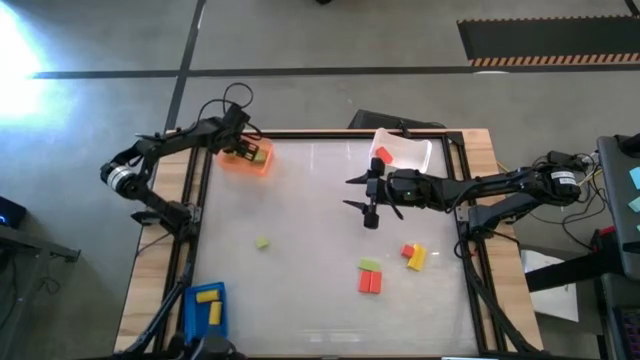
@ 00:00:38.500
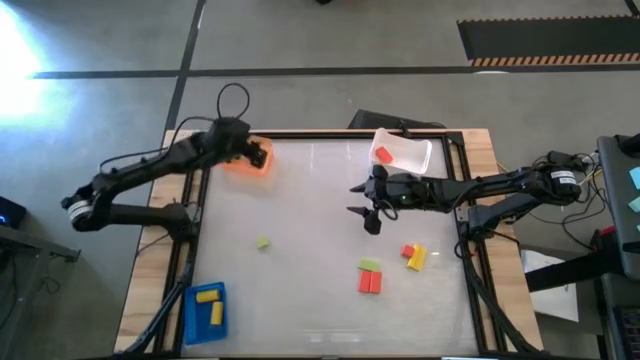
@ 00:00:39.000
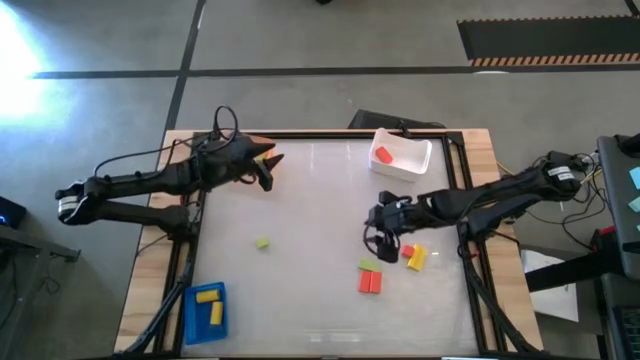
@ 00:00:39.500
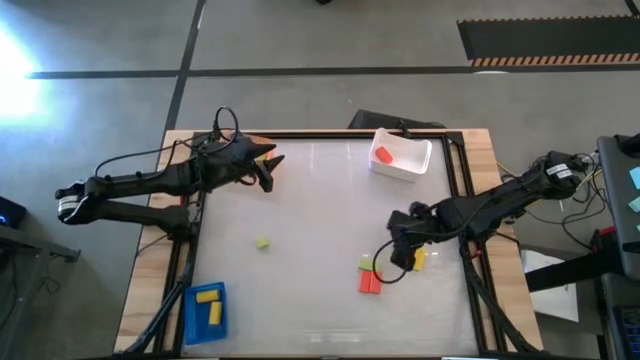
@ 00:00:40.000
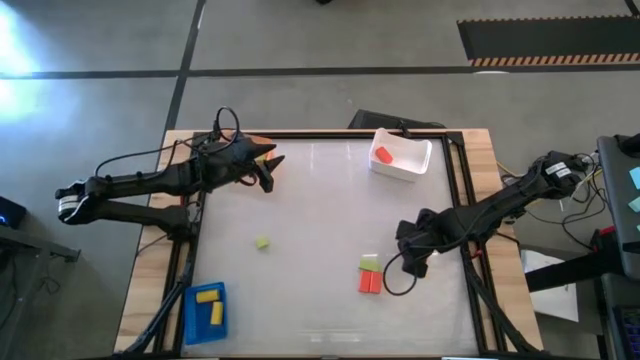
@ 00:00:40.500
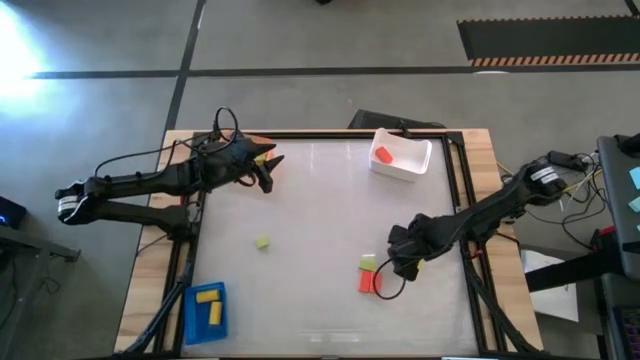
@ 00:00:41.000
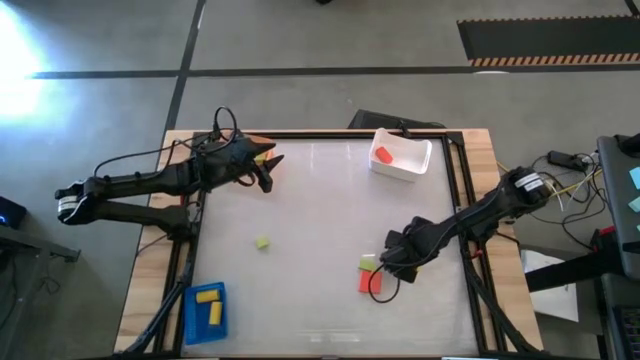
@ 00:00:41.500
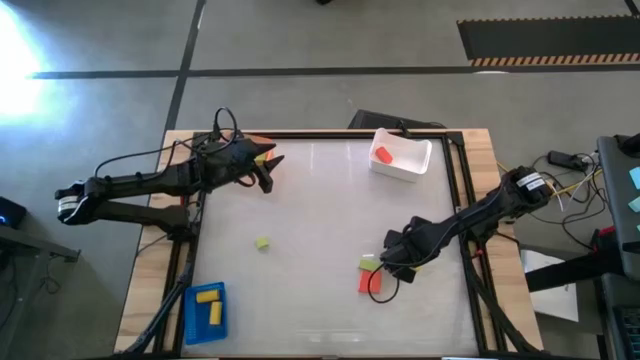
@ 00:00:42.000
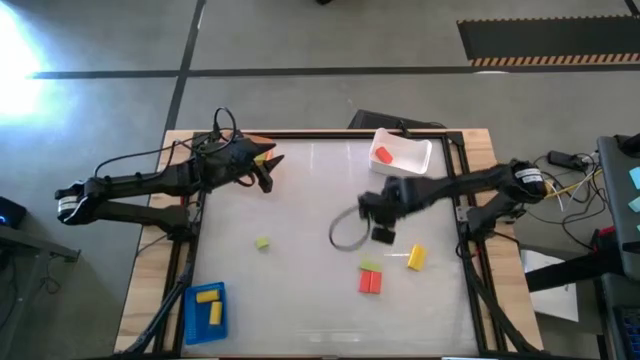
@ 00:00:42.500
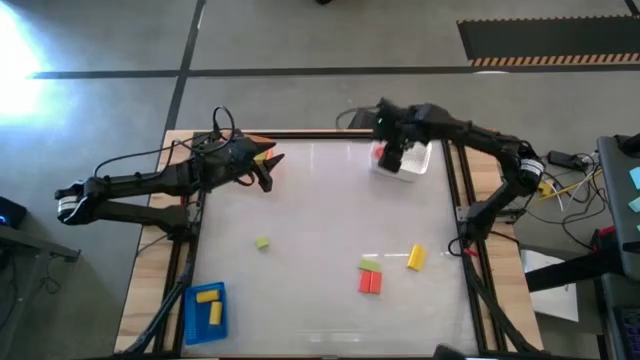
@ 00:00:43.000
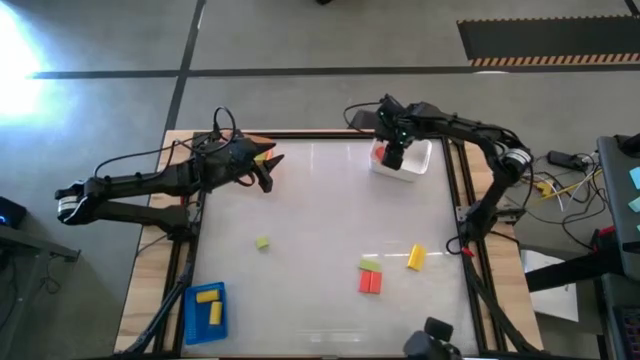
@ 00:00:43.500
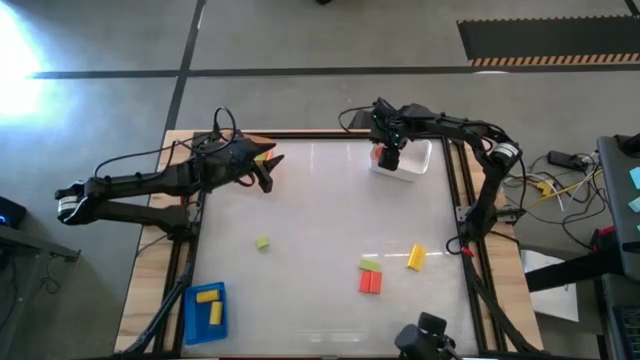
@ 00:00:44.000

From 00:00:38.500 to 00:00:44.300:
Task: Sort & place blocks by color
Put the orange square block into the white bin

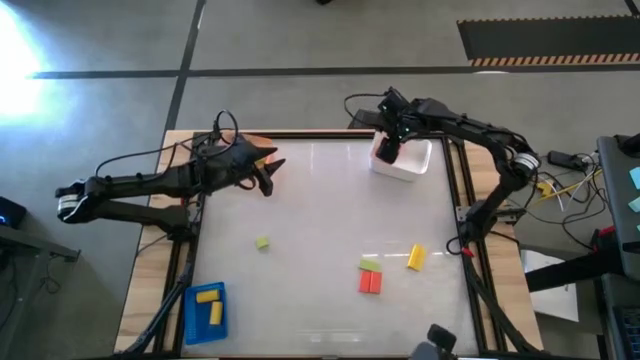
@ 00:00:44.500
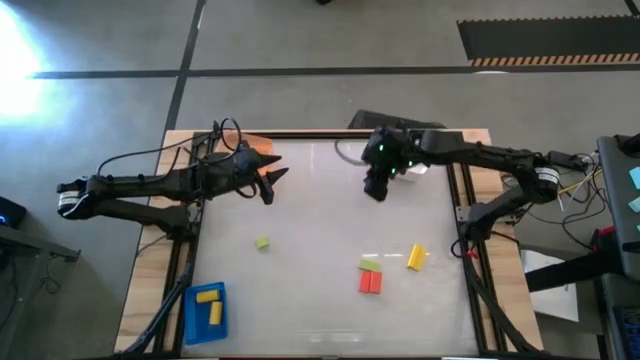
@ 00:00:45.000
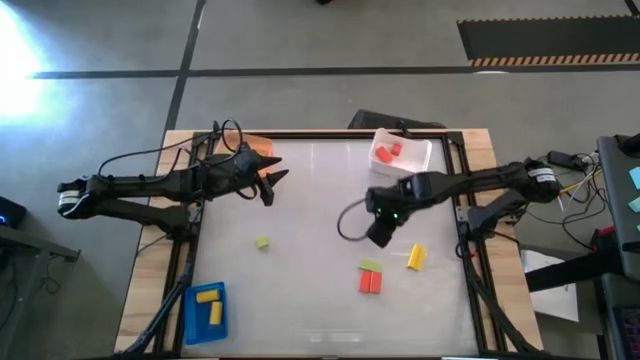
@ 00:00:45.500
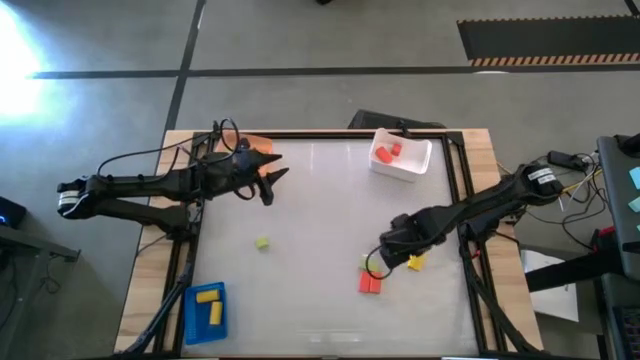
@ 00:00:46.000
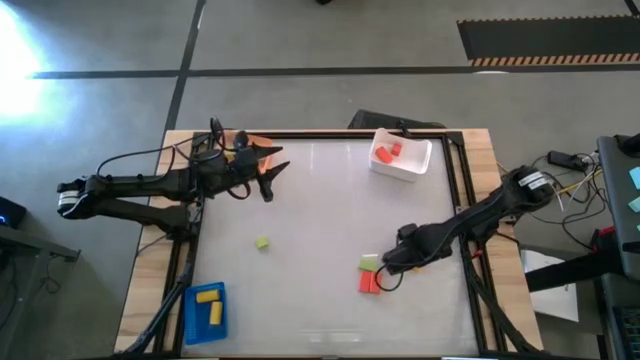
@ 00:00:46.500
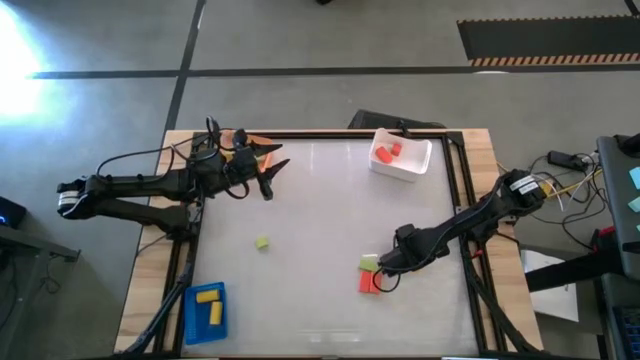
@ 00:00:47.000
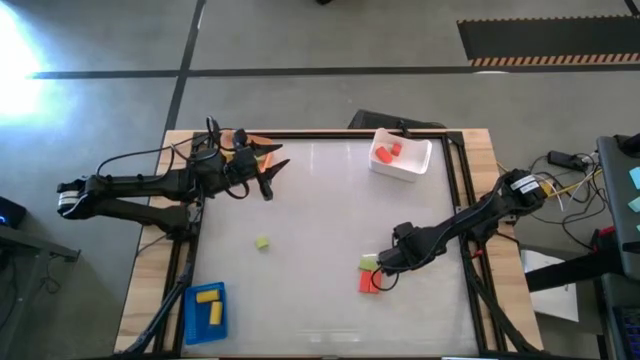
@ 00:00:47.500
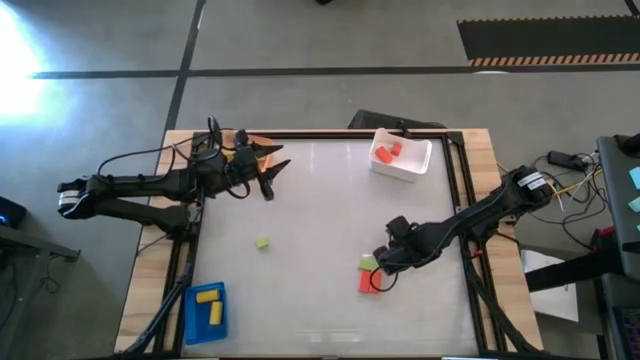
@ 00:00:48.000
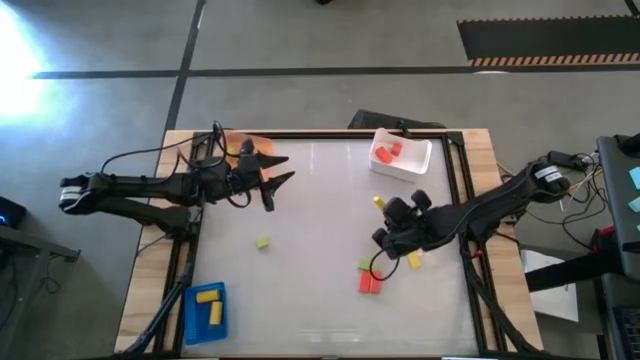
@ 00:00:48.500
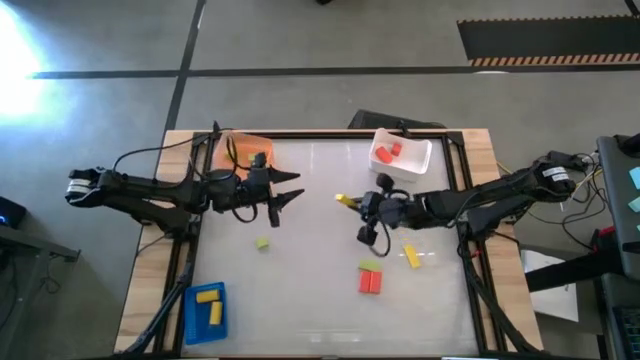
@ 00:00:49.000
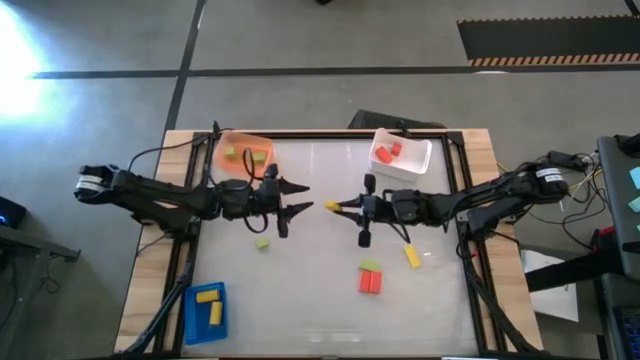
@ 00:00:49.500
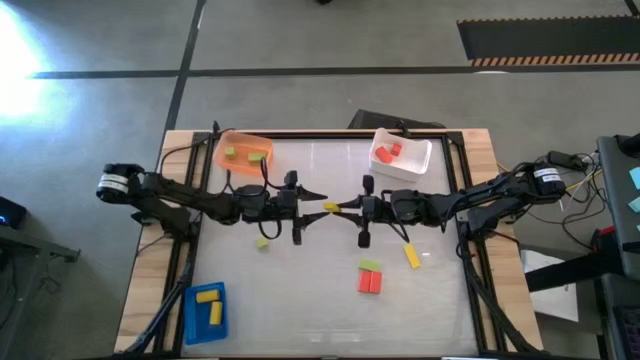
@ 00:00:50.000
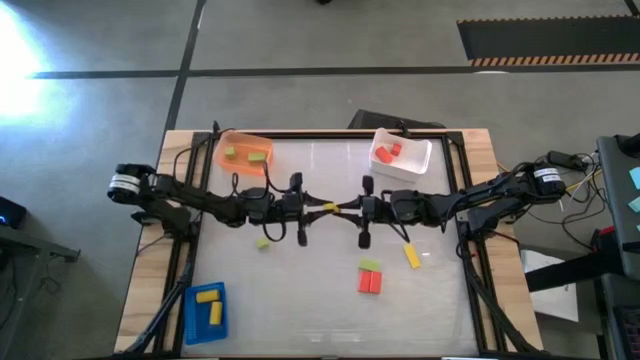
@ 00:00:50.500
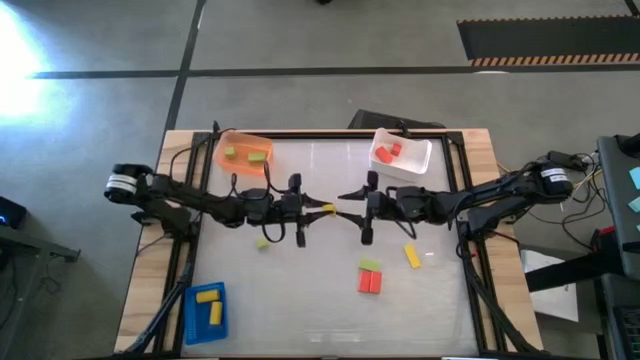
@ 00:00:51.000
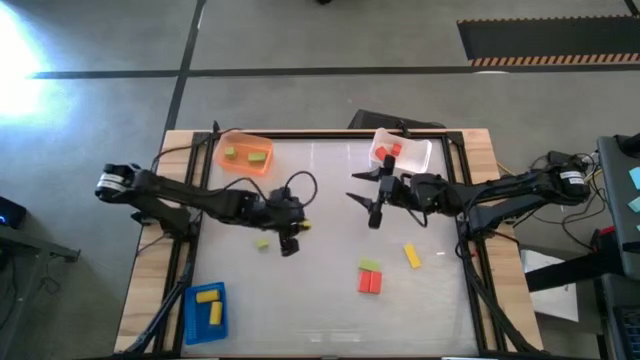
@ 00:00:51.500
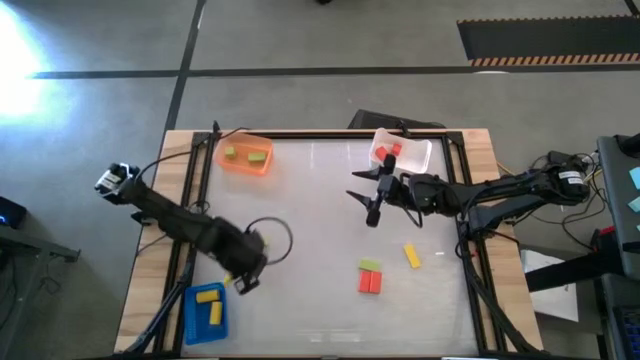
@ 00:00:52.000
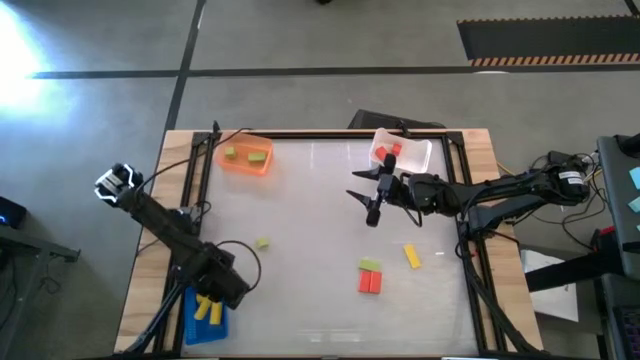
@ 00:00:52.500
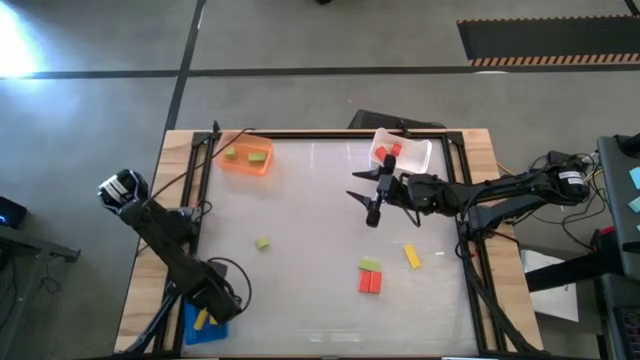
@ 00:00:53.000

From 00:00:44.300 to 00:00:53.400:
Put the left yellow rectangular block into the blue basket

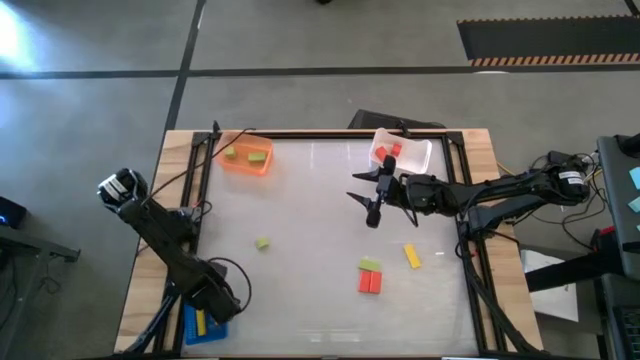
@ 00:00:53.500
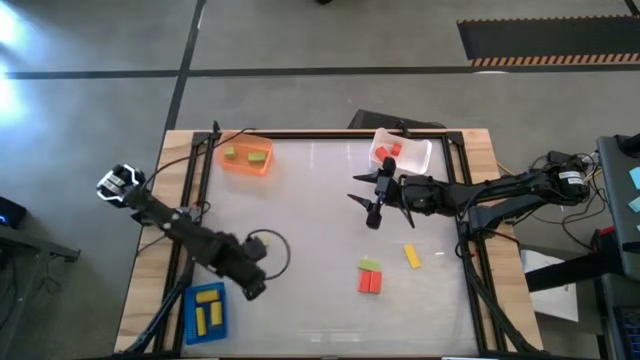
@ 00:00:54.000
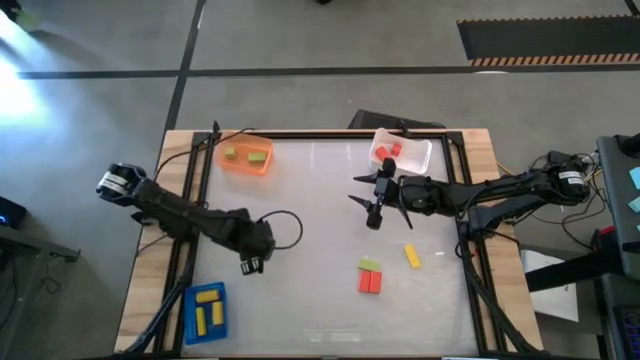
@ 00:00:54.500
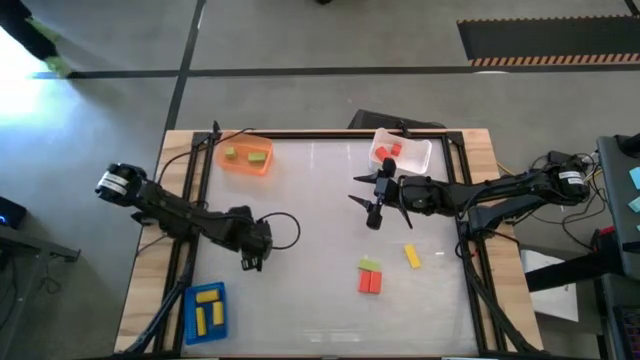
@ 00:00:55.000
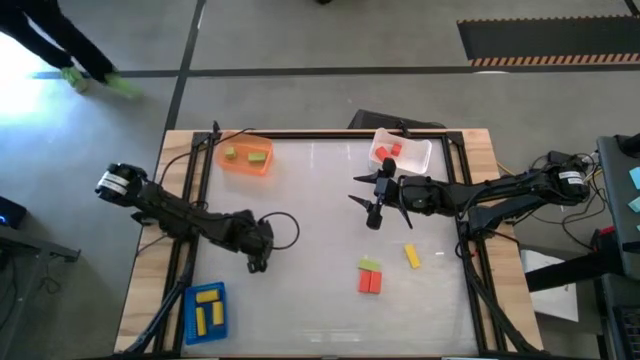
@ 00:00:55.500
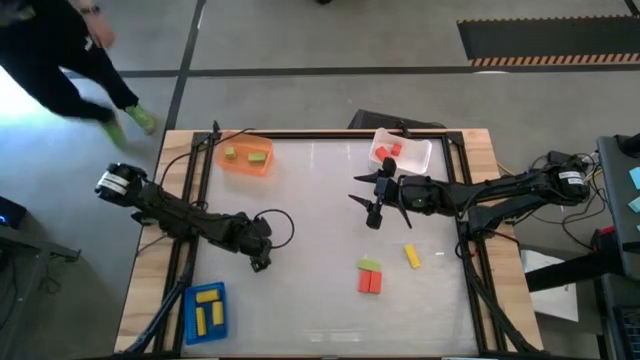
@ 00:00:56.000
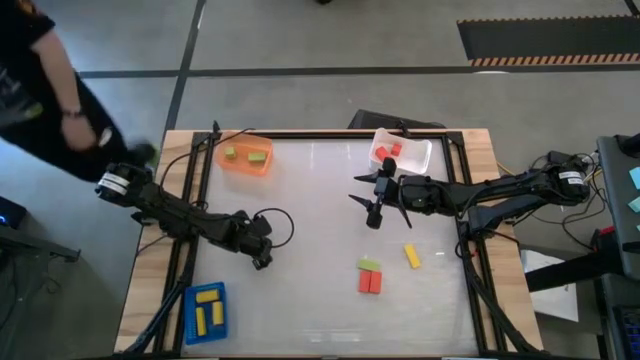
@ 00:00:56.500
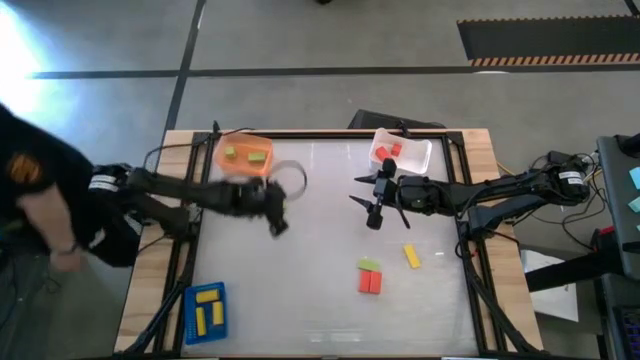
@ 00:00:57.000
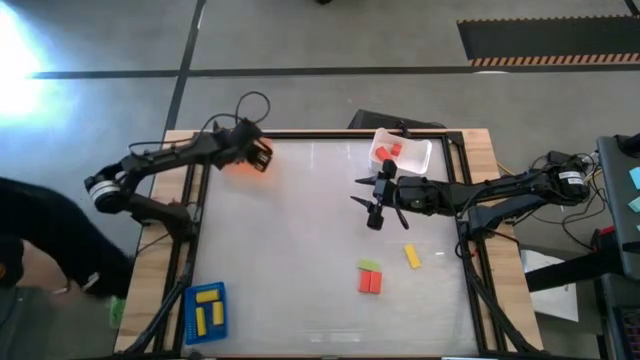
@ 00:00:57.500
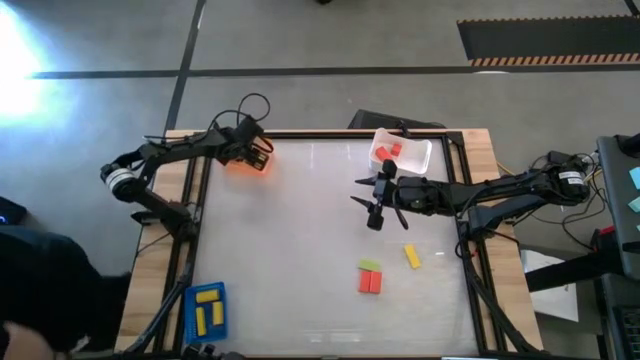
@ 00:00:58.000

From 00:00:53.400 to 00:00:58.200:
Put the green semicircle block into the orange bin

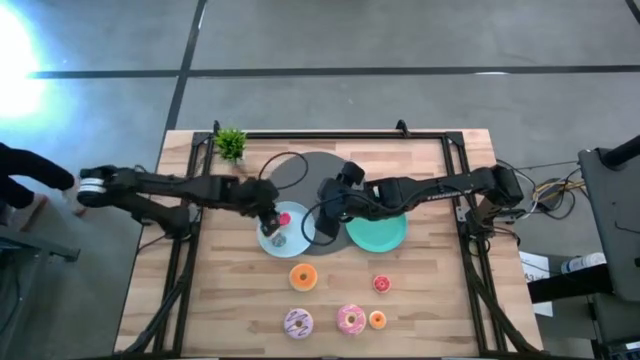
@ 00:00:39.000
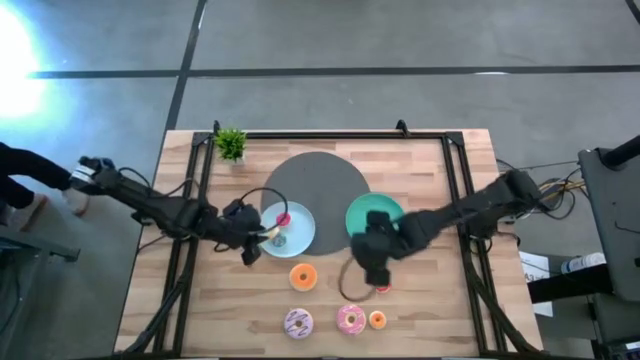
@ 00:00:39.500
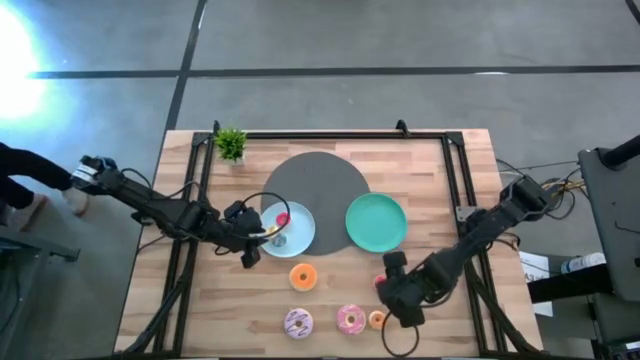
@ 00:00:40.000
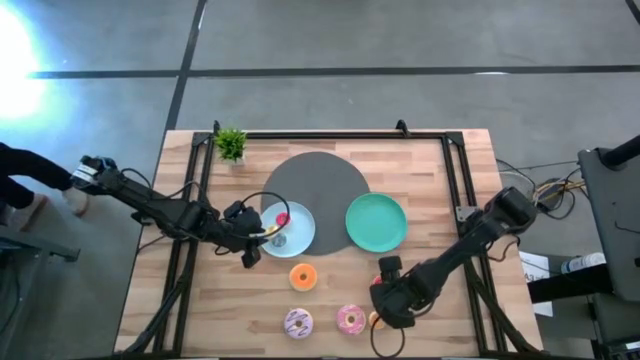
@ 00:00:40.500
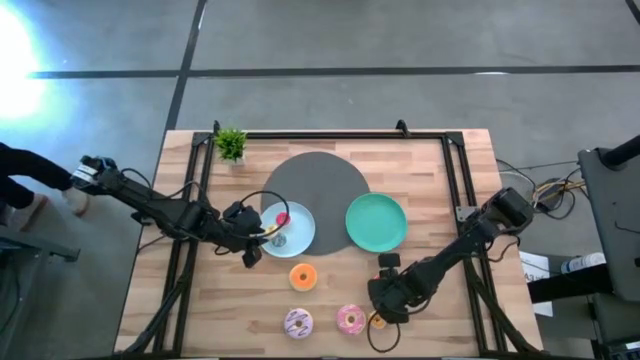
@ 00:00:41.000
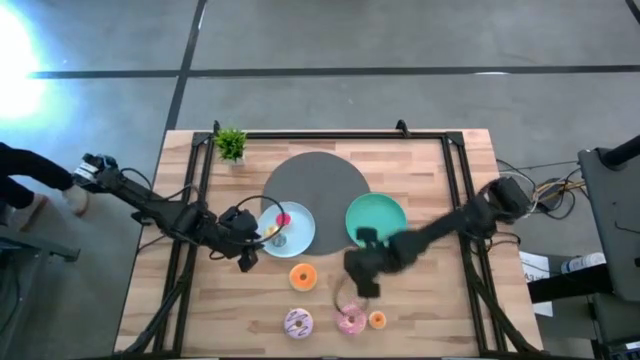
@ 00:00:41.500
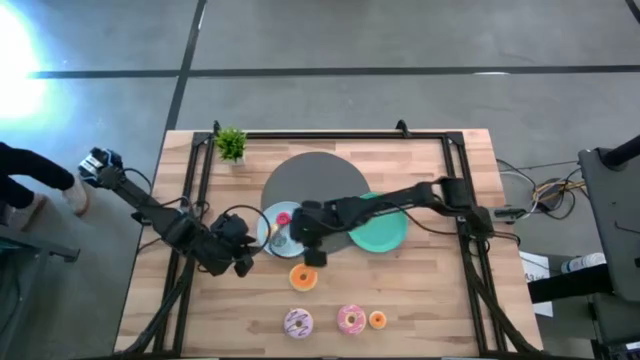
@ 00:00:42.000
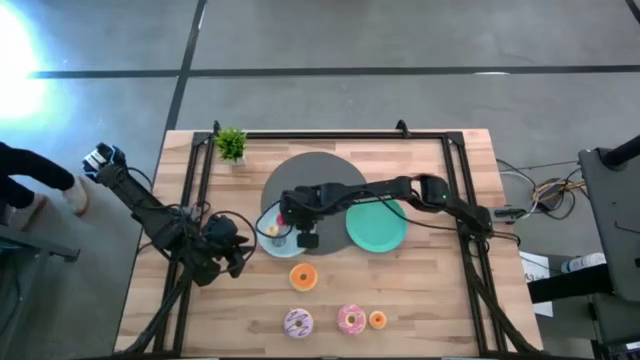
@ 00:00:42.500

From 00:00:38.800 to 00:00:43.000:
Task: Pick & Place donuts
Put the small dark orange donut on the light blue plate
